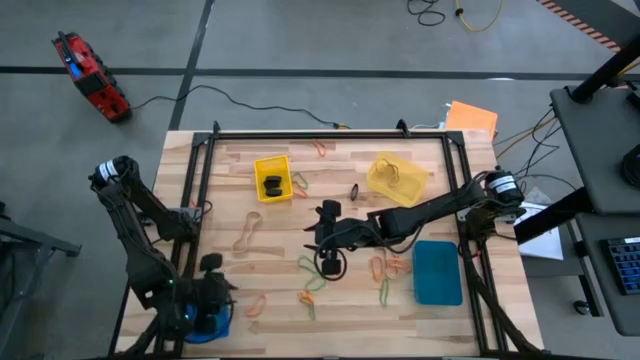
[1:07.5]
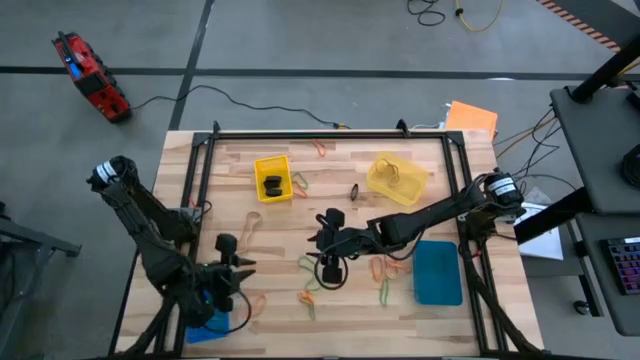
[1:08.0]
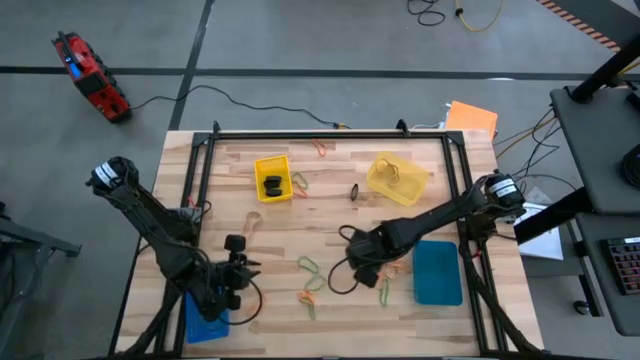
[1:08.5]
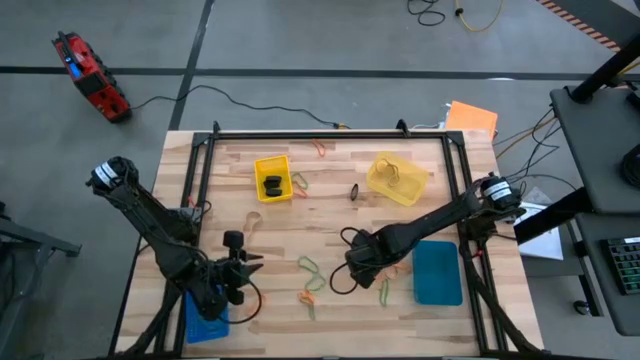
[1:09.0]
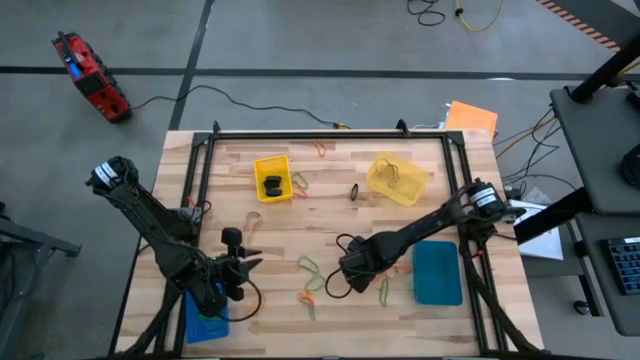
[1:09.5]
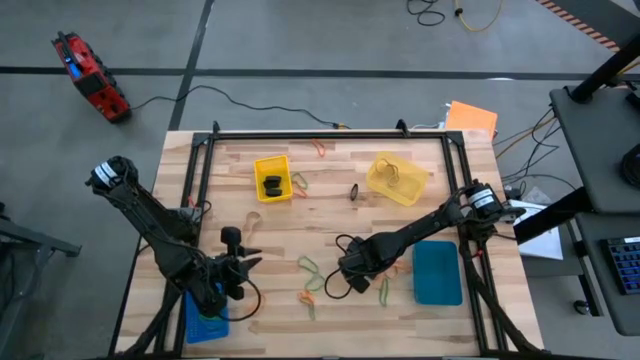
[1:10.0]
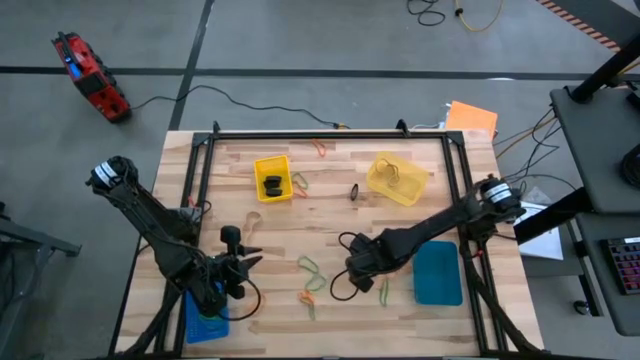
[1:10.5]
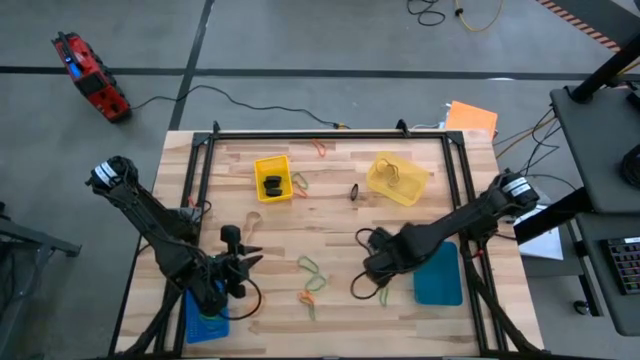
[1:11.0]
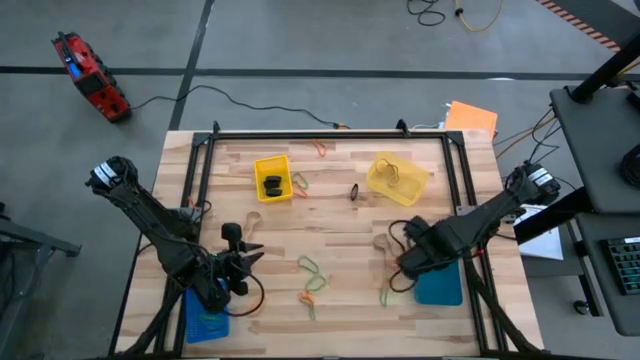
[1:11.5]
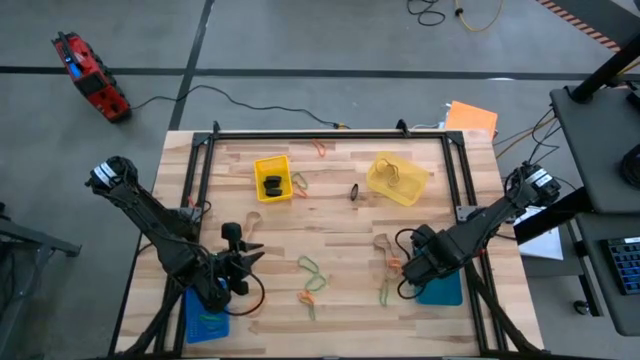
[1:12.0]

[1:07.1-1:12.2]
Task: Sort rubber bands into baskets
Put the orange rubber band into the right blue bin

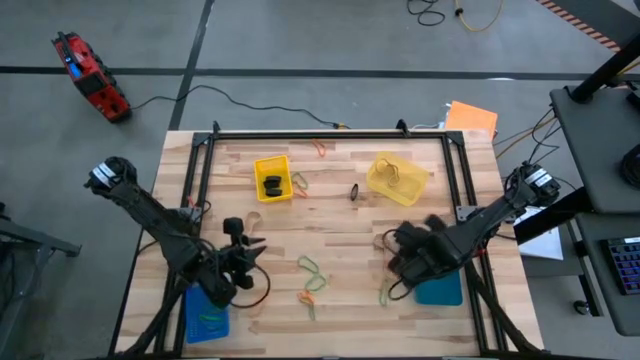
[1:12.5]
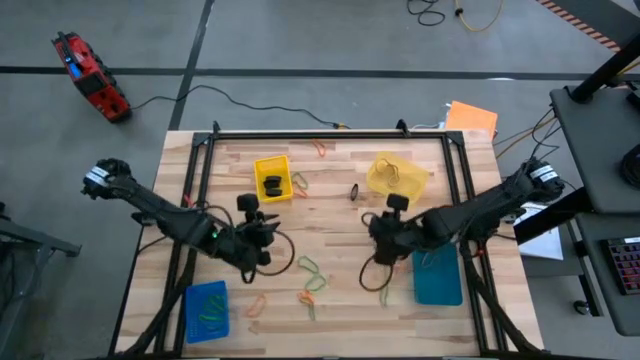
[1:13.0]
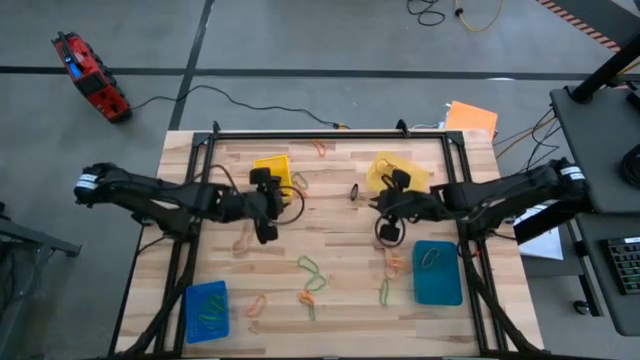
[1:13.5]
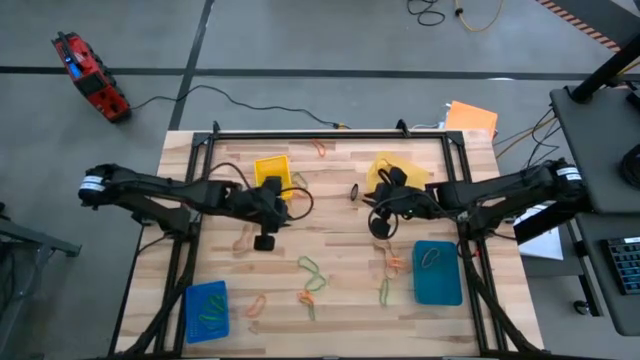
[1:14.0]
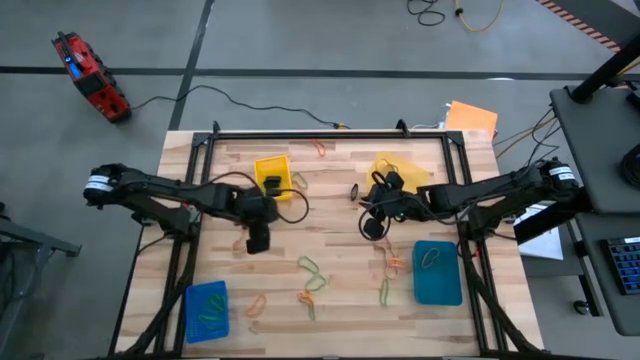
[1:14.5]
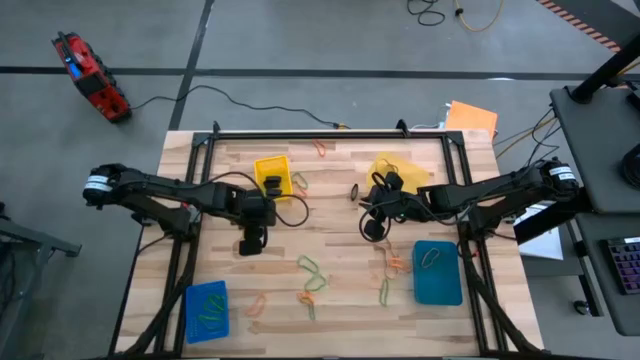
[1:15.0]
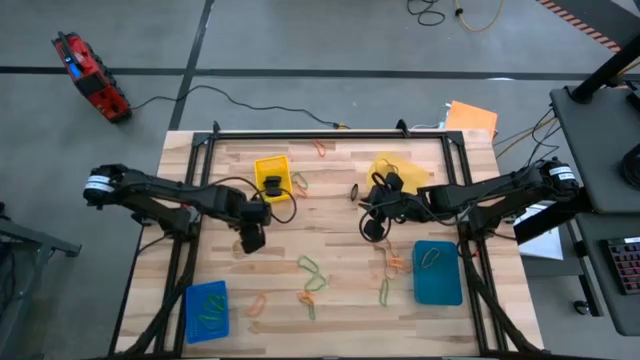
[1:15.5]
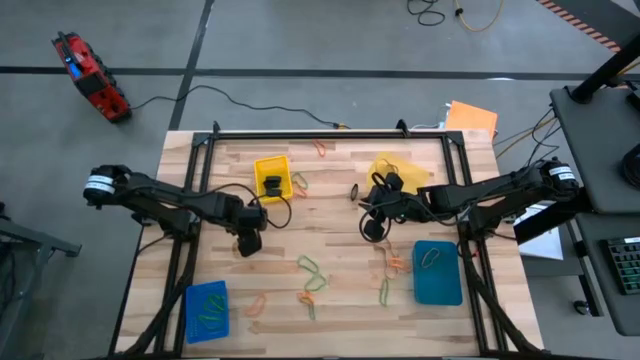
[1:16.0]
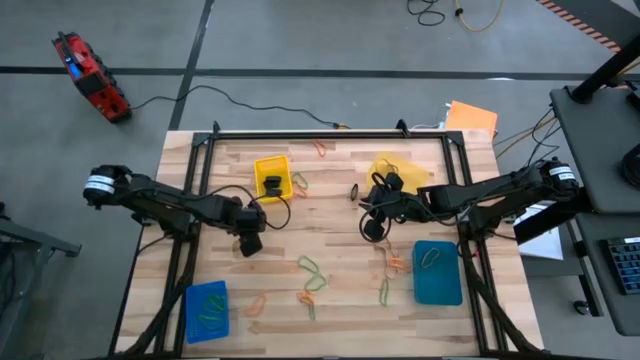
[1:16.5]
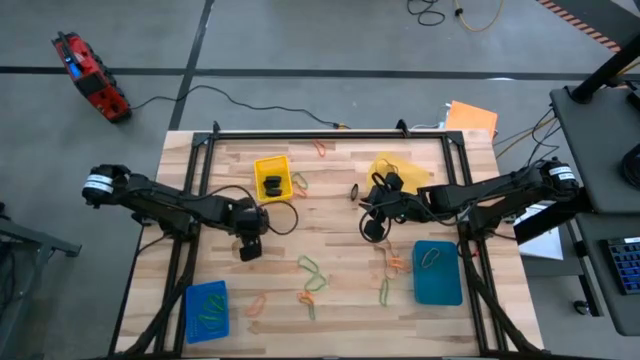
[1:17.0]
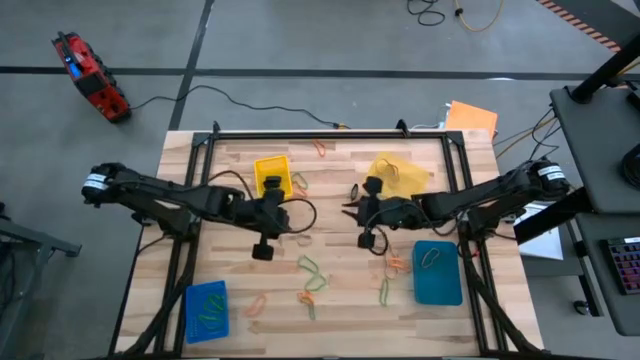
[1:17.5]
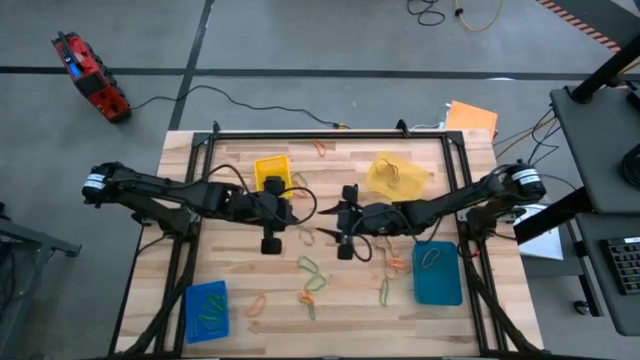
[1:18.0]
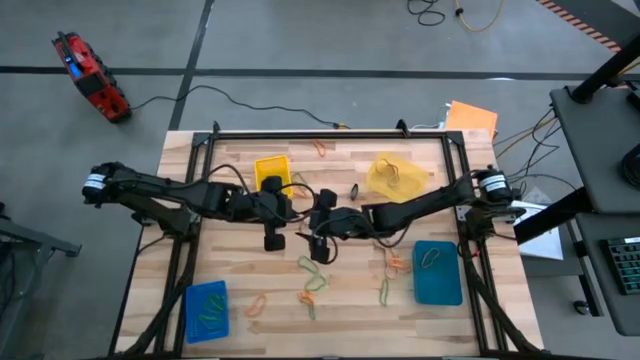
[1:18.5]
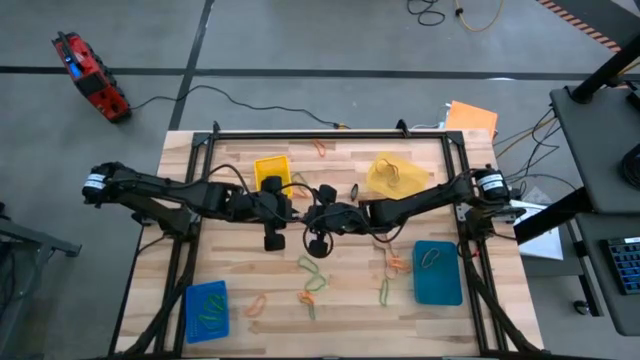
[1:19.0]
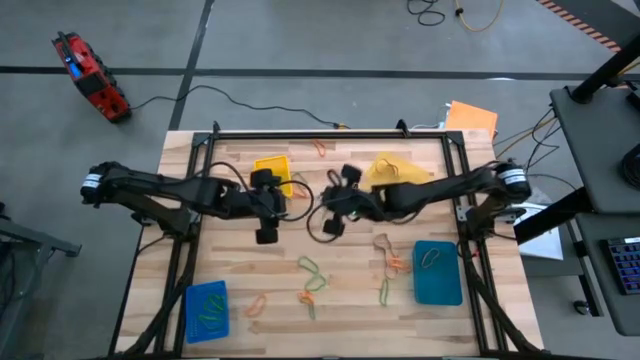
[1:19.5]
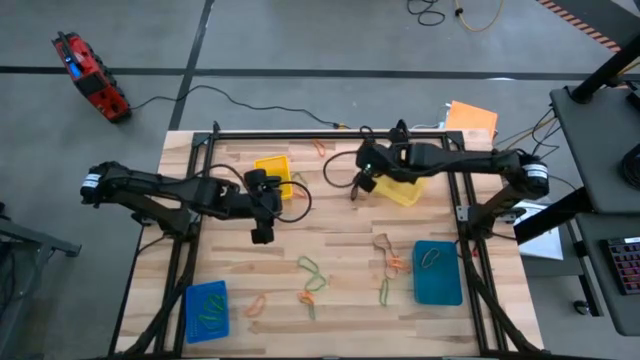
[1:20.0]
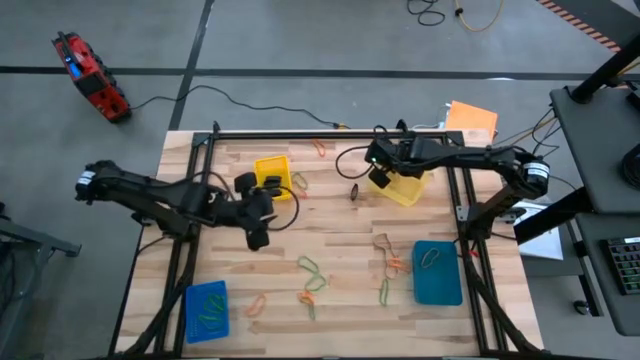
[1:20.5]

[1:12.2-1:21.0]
Put the brown rubber band into the right yellow bin

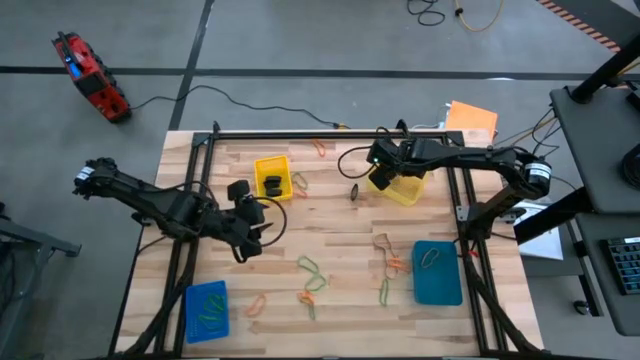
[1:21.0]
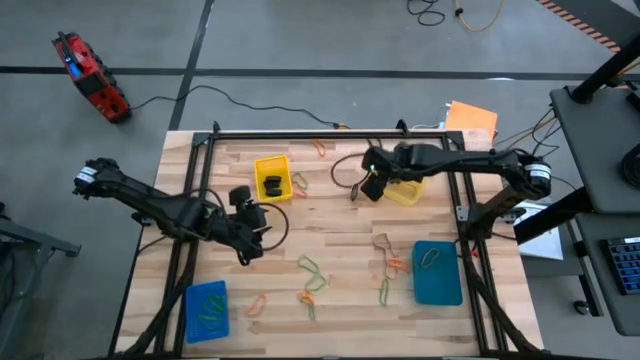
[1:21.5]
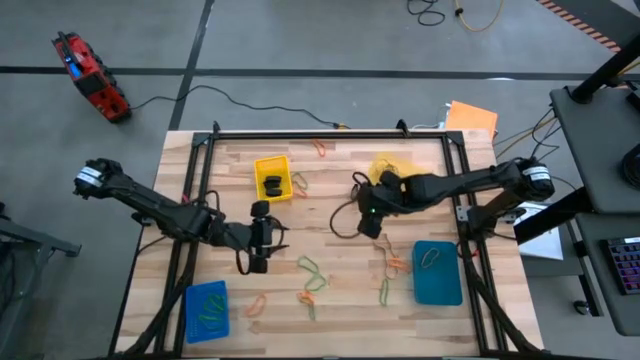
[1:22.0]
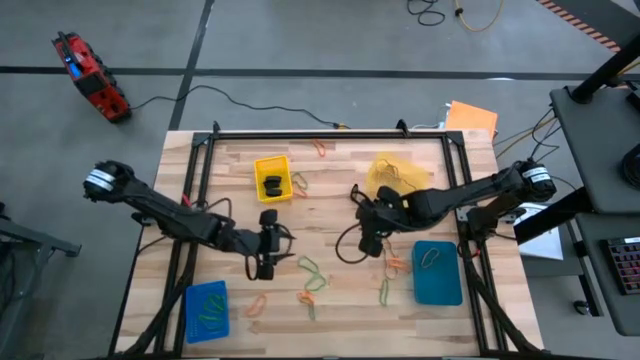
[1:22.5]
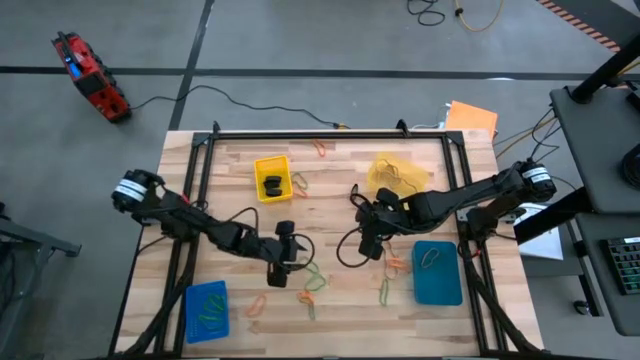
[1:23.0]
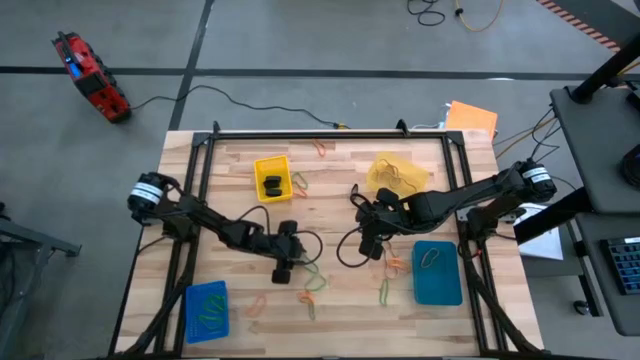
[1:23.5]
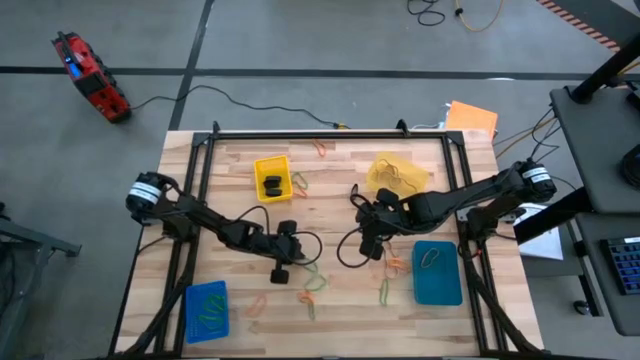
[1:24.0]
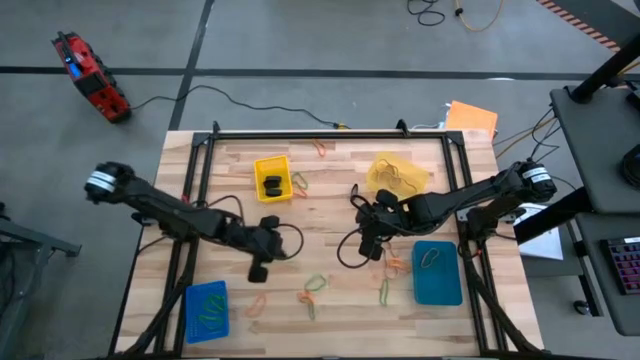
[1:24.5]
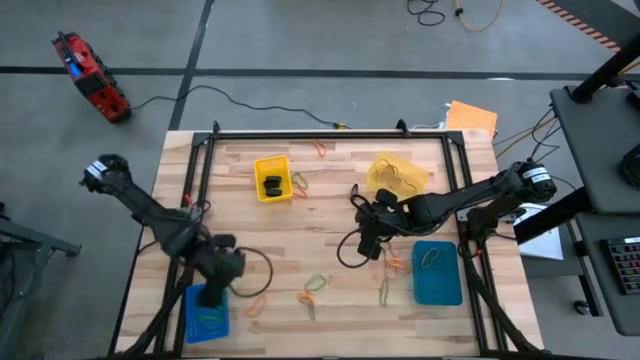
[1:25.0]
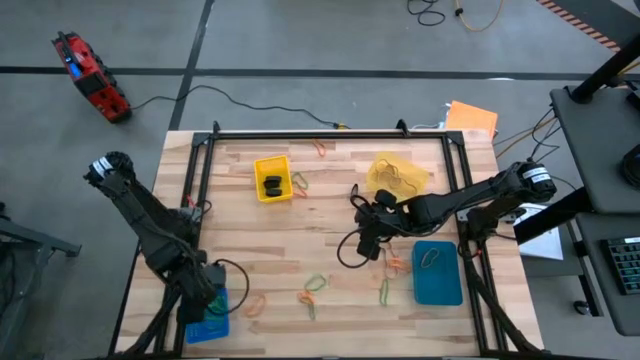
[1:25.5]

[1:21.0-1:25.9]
Put the green rubber band into the left blue bin

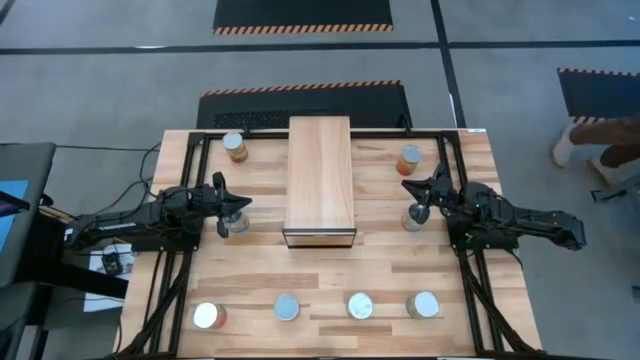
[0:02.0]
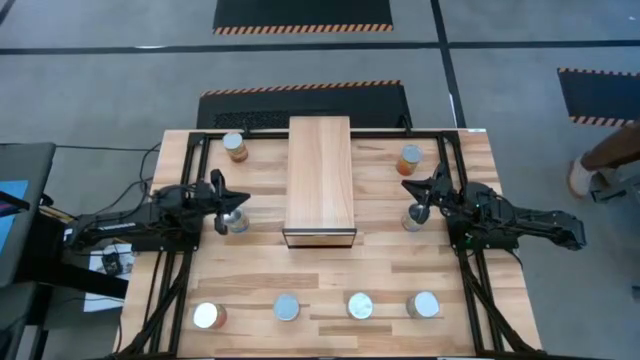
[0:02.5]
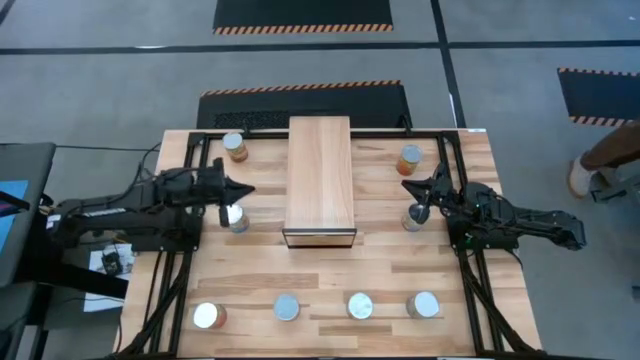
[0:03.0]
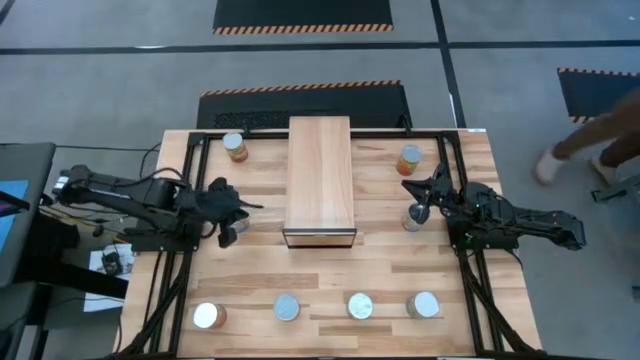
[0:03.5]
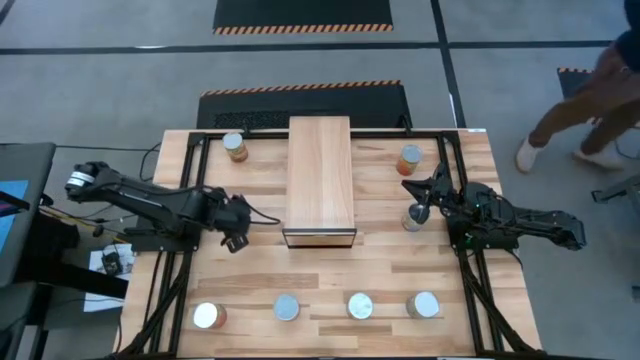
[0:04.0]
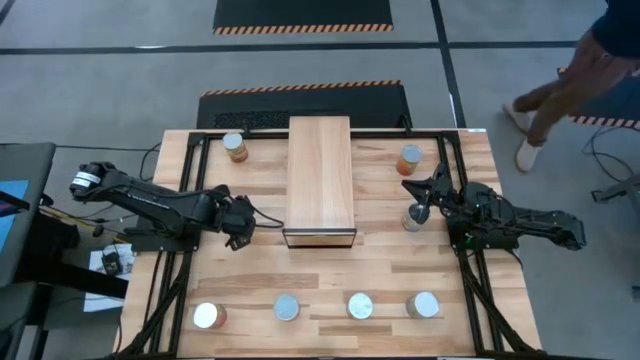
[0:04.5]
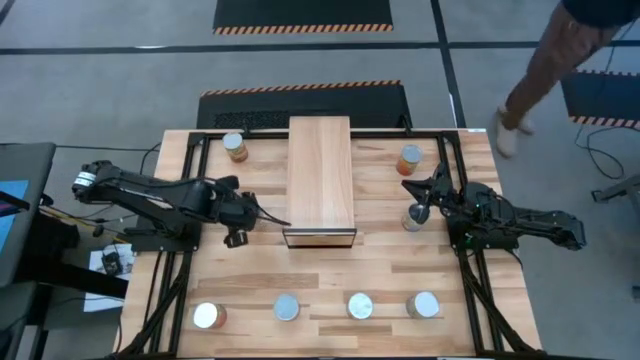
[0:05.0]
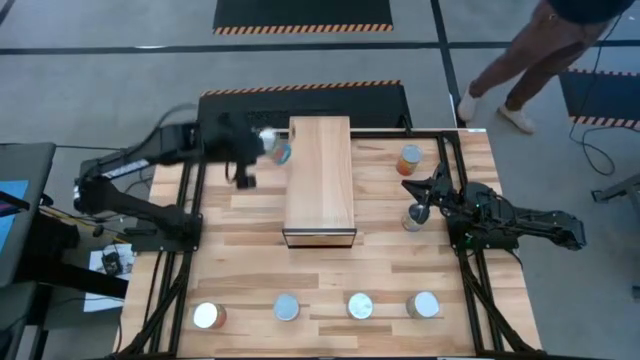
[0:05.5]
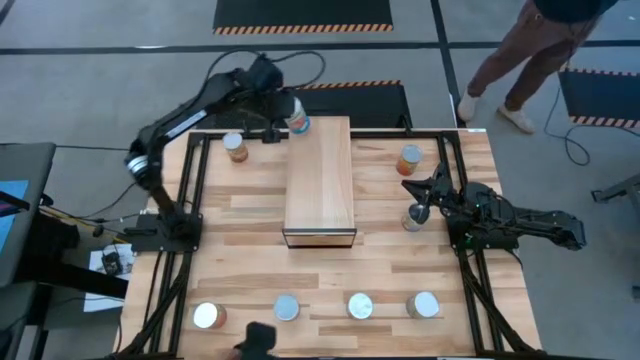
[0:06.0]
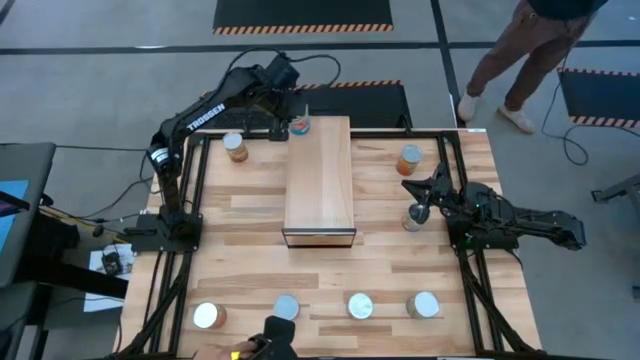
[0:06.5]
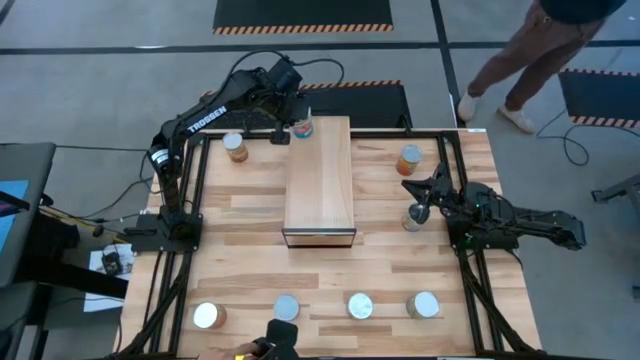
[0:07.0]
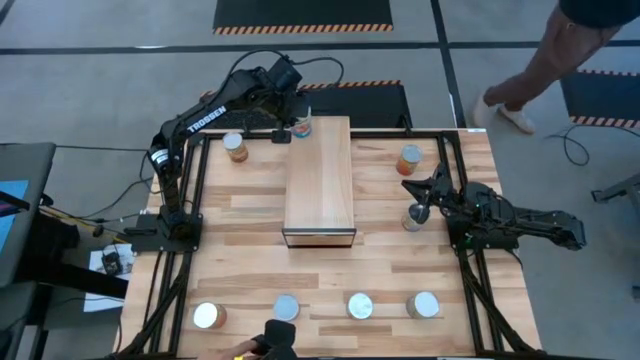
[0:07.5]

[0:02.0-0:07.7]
Task: Pick and place cans onto a shelf
Put the top canned tomatoes on the shelf
